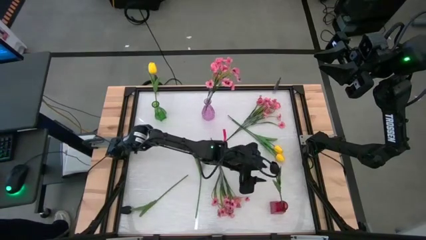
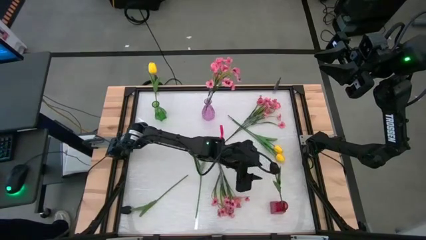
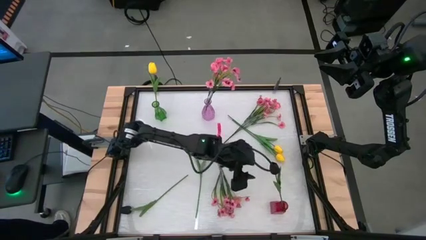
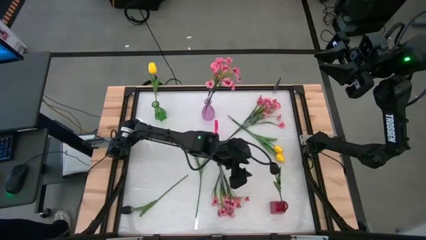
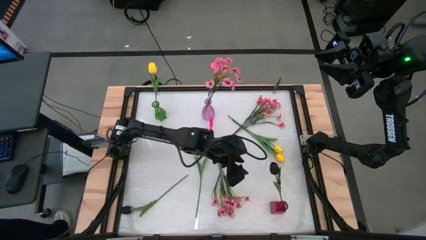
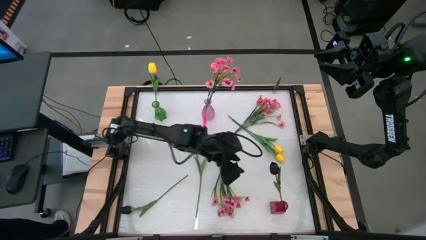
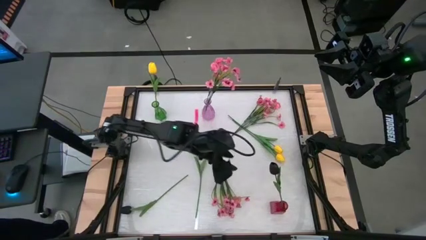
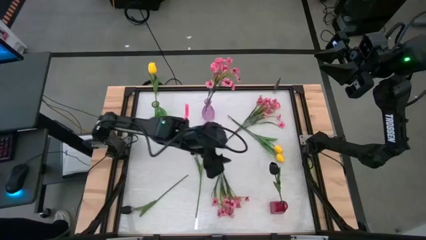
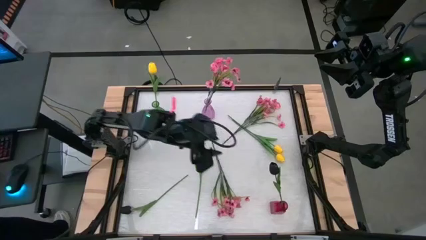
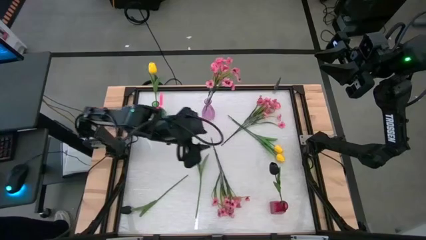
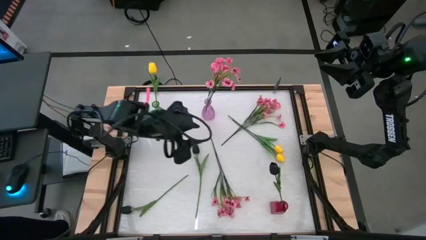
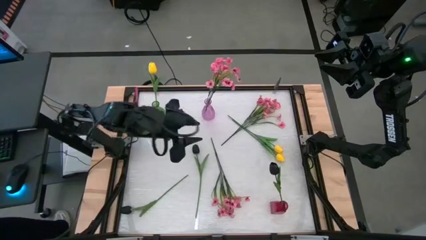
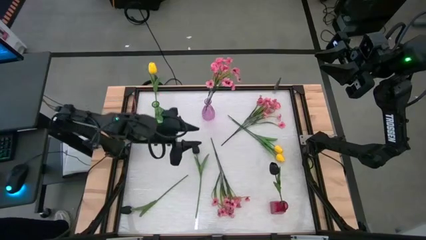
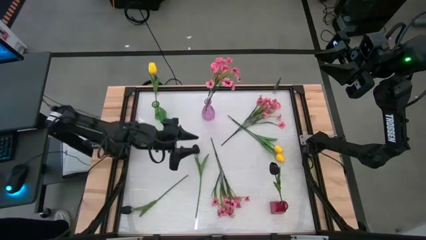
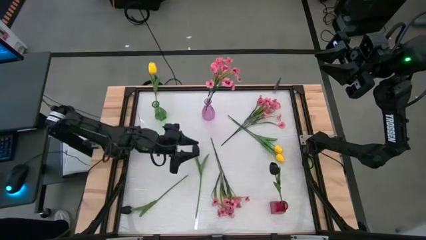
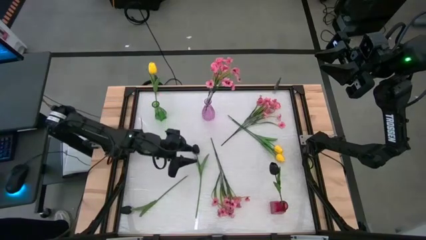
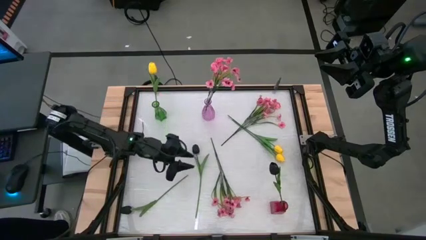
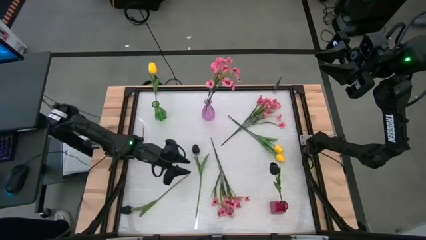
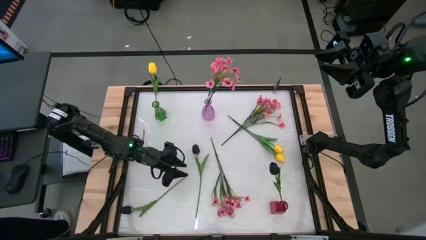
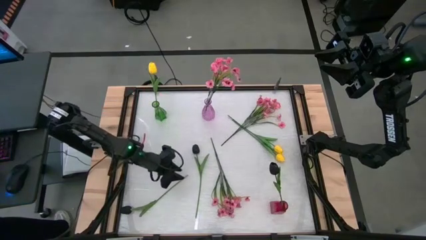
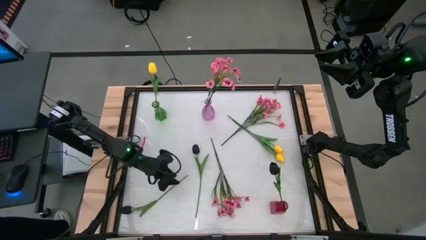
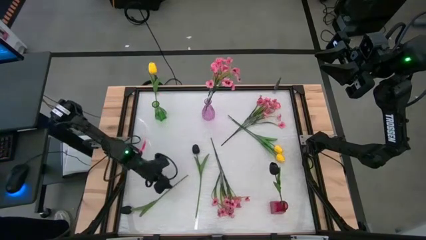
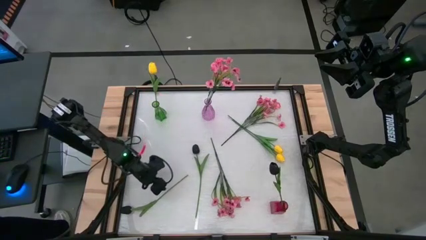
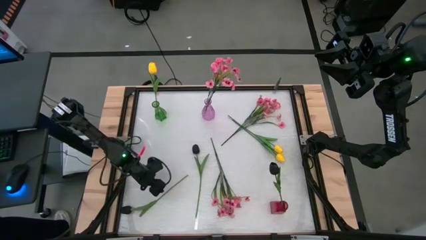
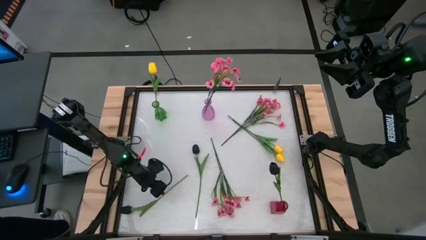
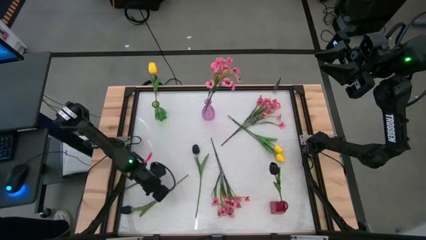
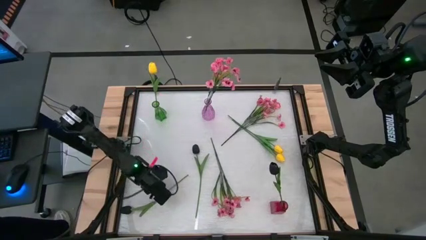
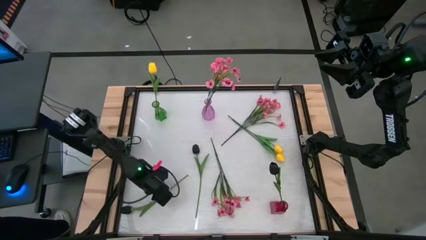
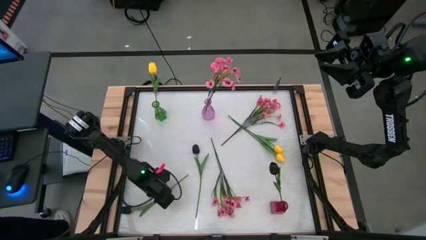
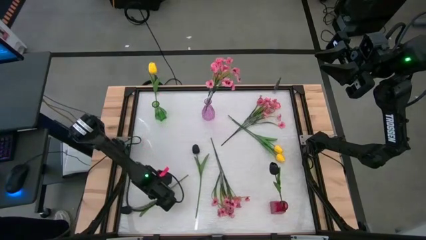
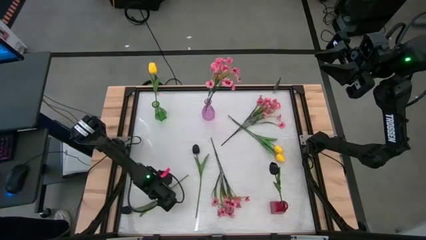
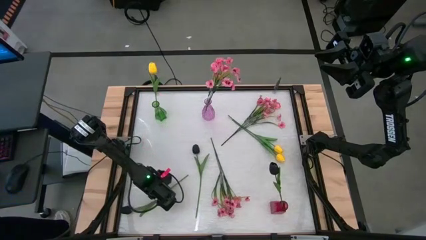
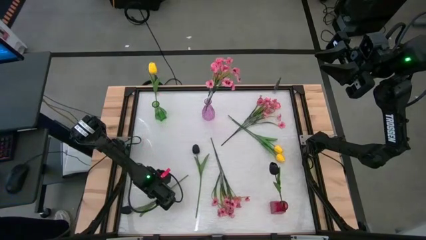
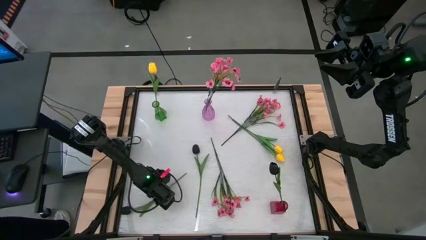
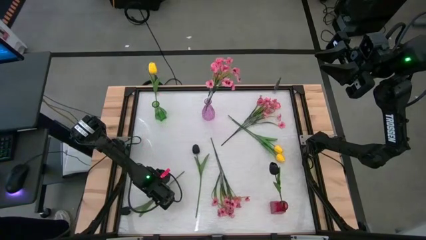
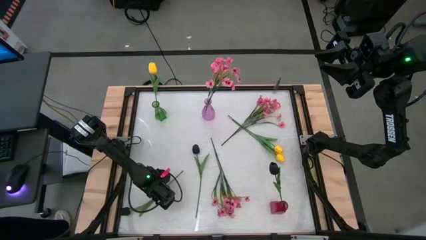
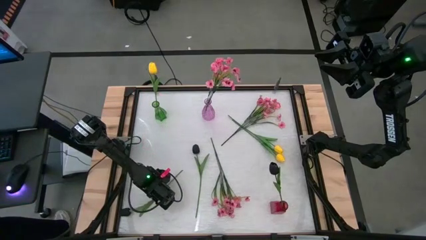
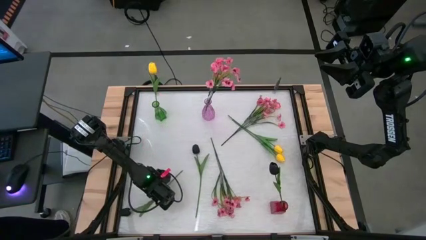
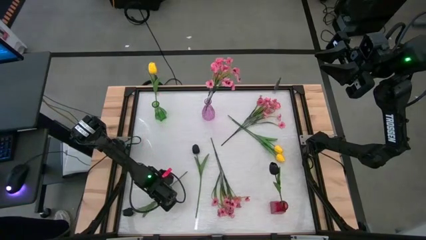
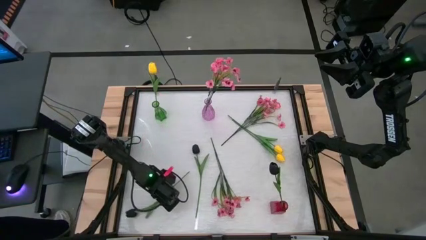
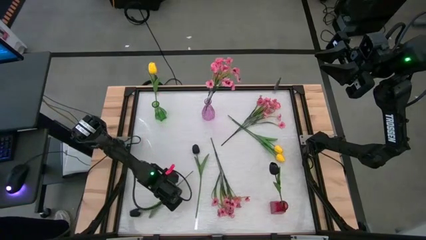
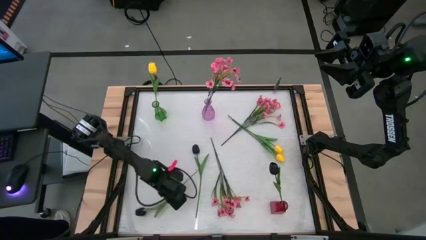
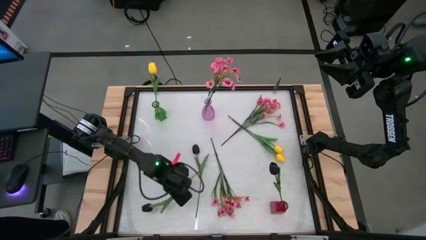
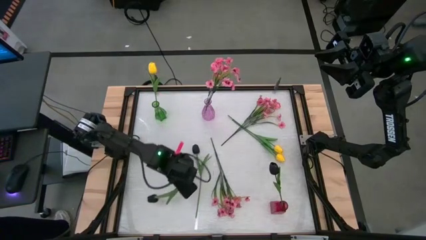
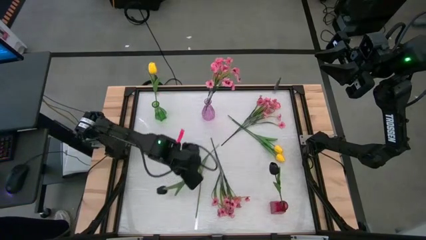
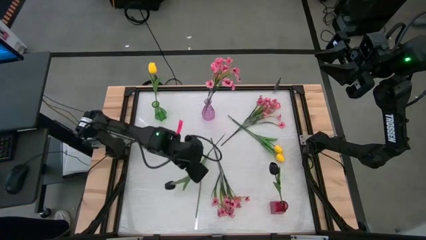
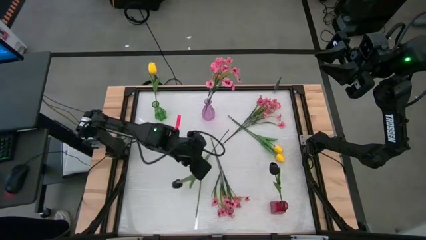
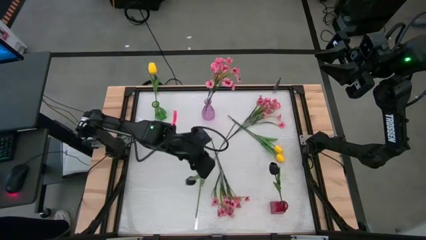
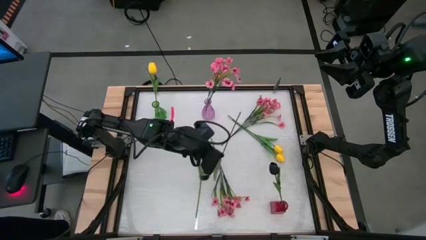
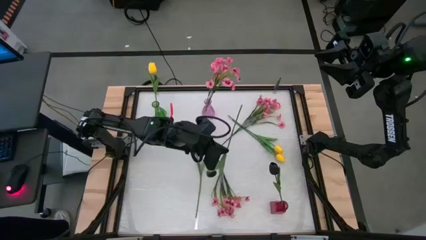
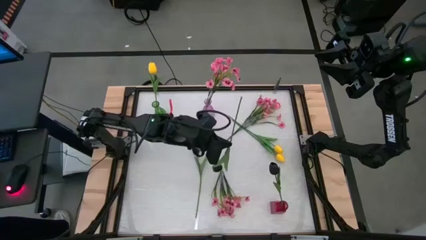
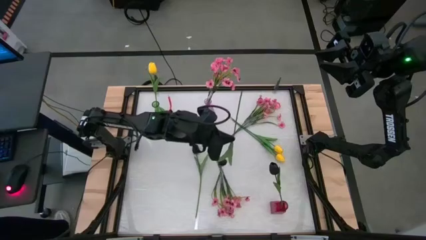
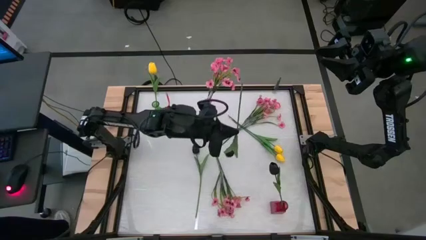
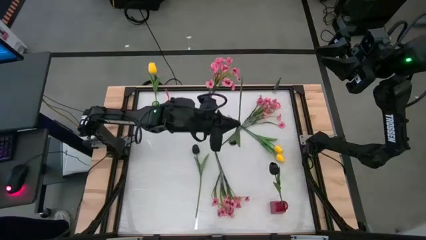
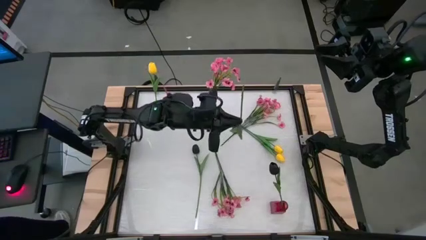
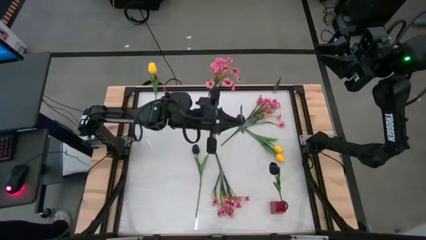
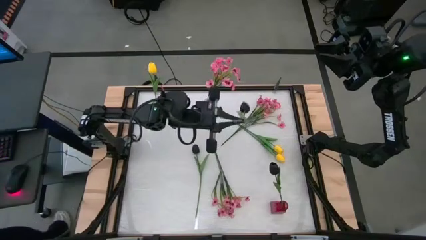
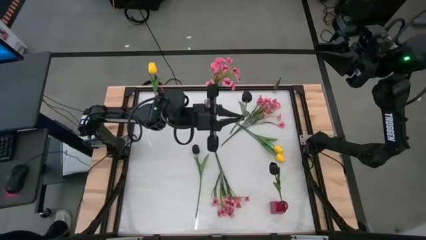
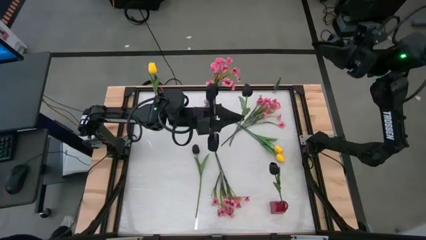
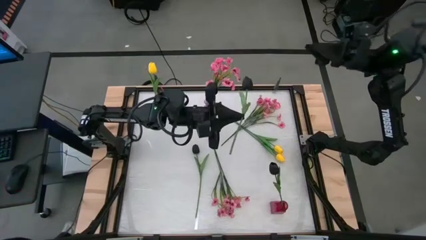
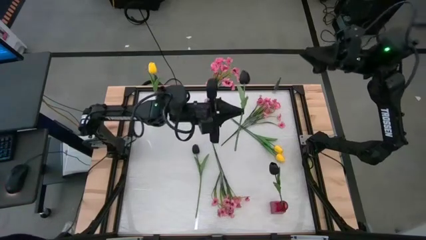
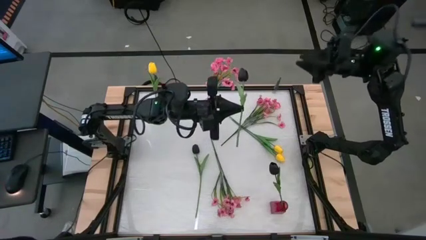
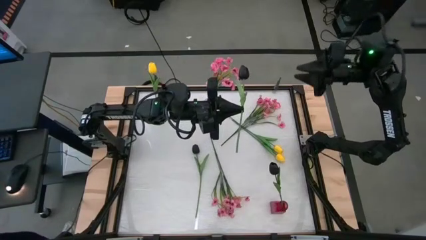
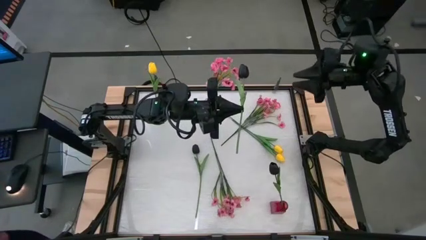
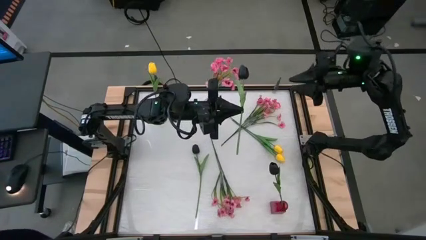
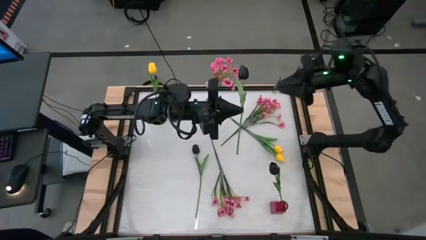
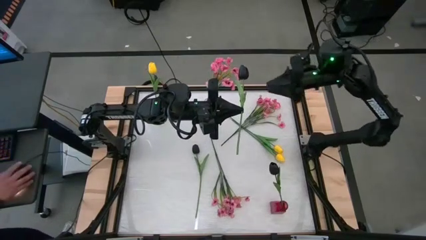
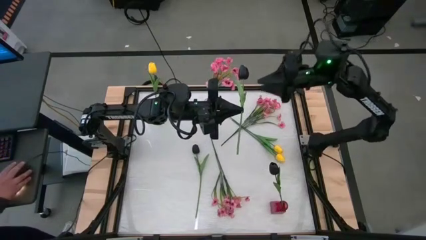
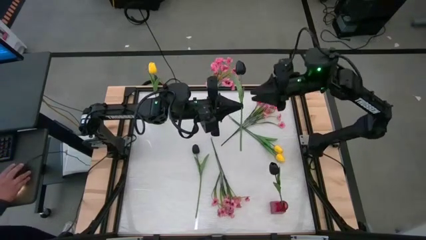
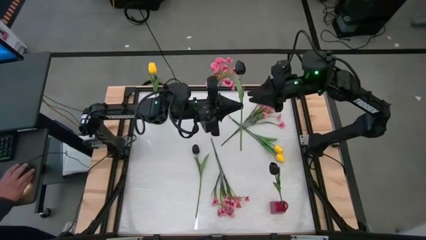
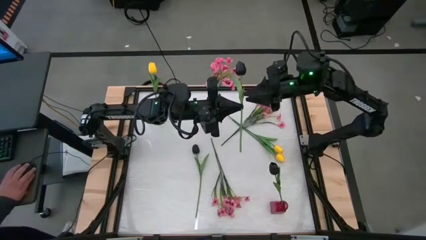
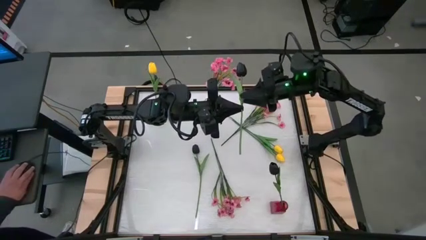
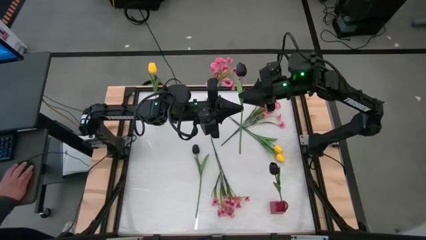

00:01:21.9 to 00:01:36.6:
Task: Sort flowers into vase by color
Put the left black flower into the red vase

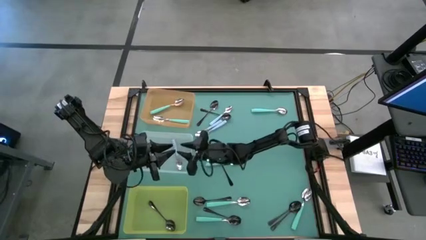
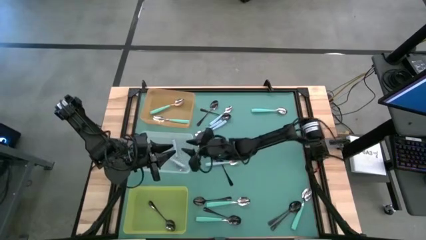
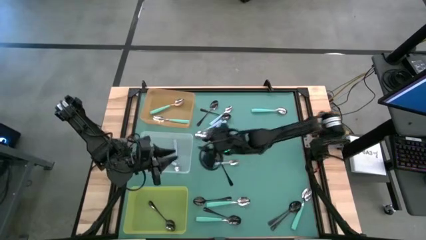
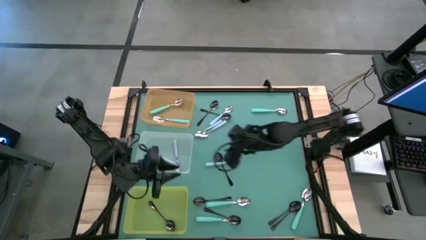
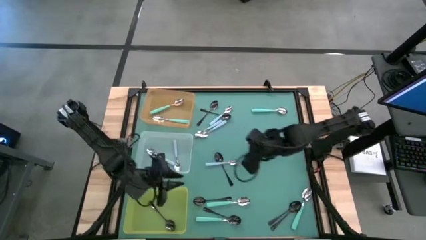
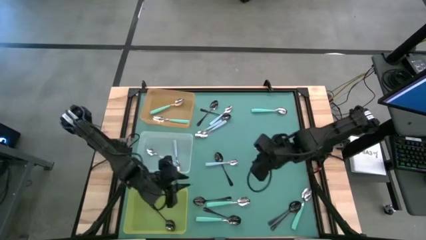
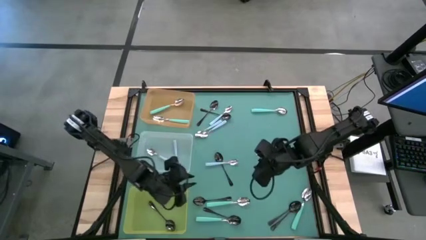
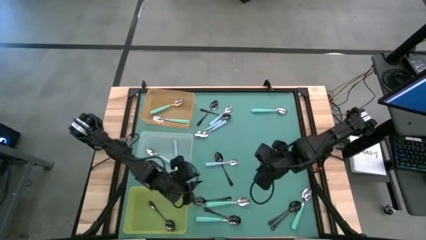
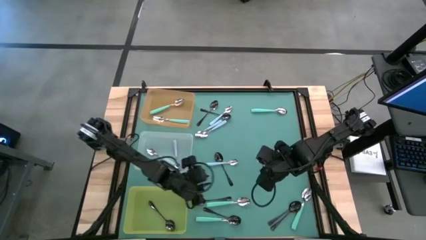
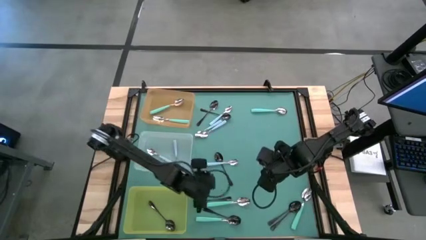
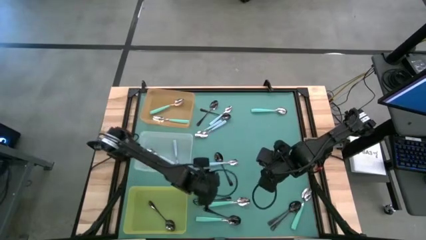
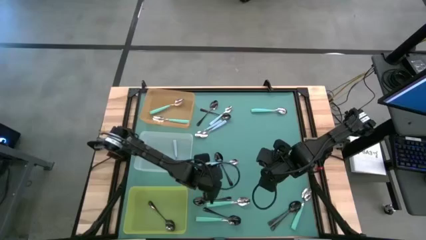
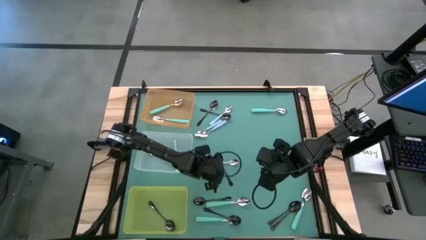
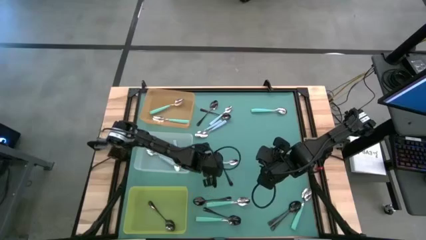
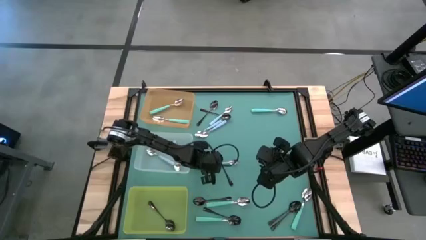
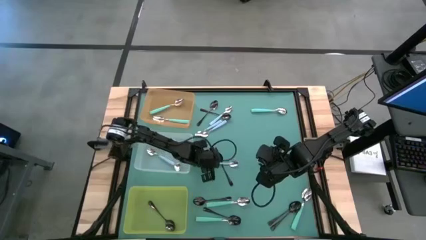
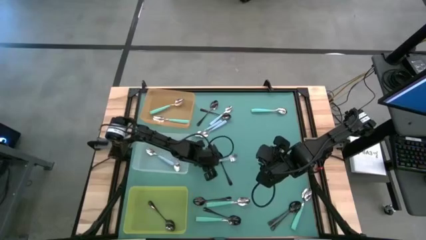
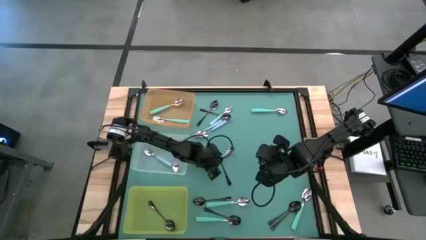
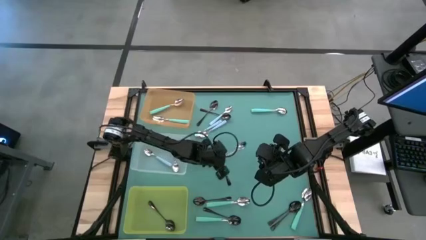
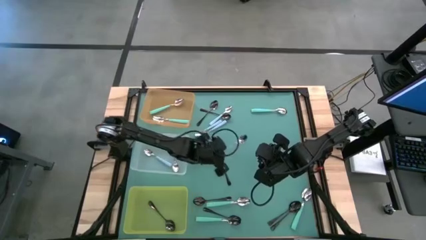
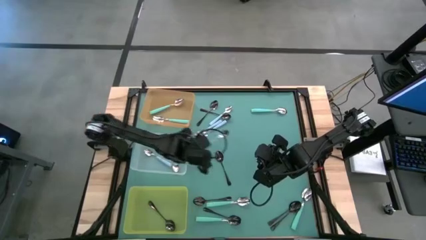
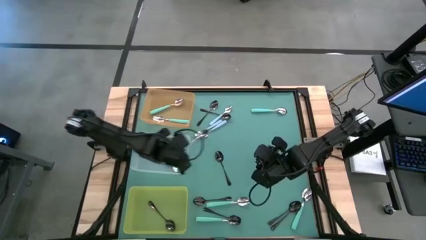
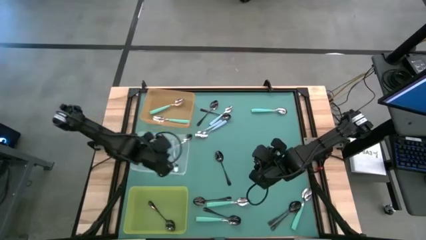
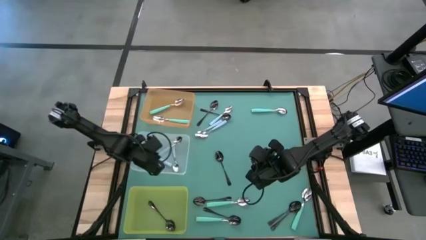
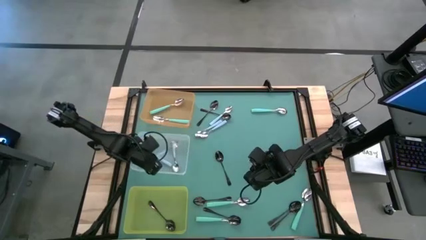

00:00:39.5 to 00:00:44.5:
Task: Sort silverware by color (type)
Put the blue spoon into the transparent bin
